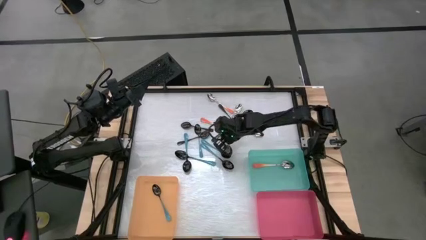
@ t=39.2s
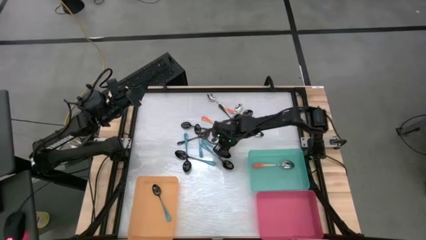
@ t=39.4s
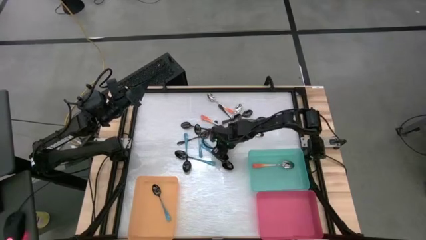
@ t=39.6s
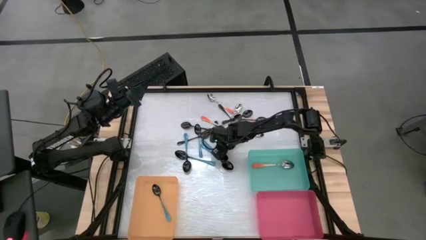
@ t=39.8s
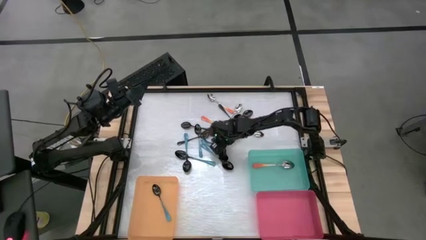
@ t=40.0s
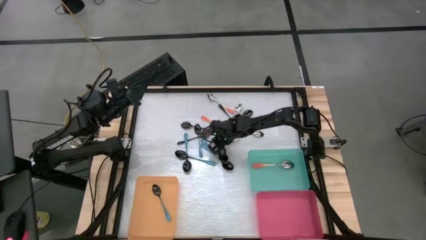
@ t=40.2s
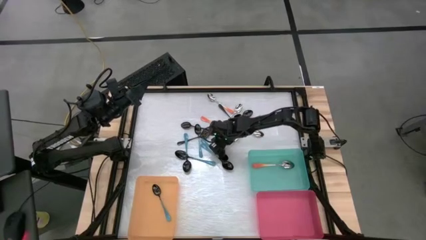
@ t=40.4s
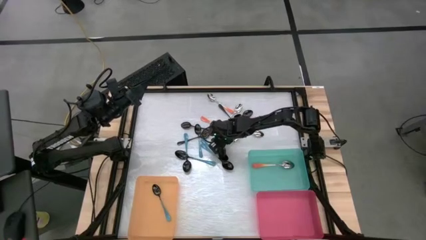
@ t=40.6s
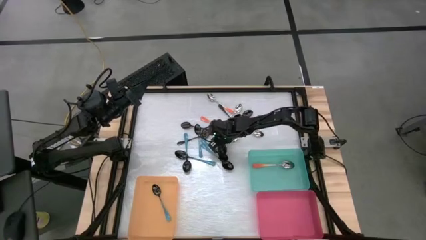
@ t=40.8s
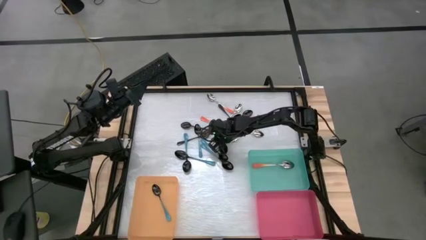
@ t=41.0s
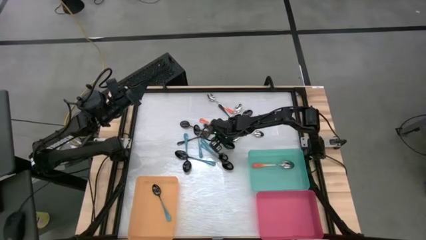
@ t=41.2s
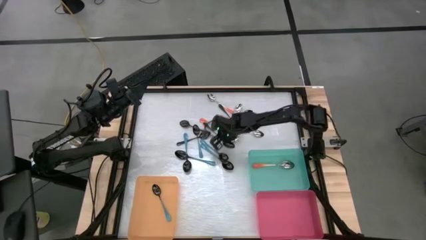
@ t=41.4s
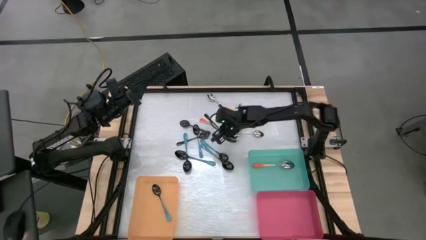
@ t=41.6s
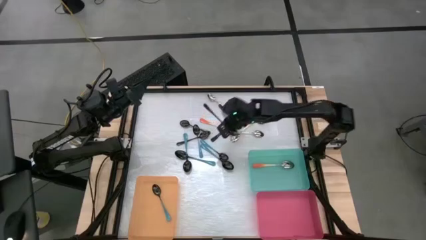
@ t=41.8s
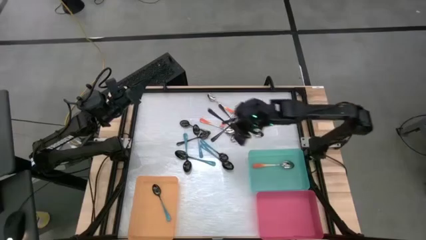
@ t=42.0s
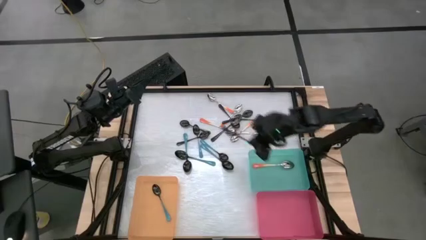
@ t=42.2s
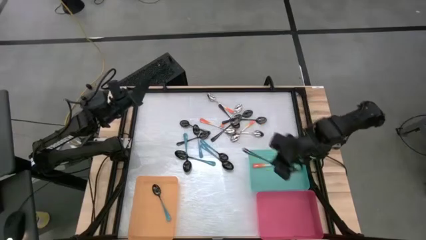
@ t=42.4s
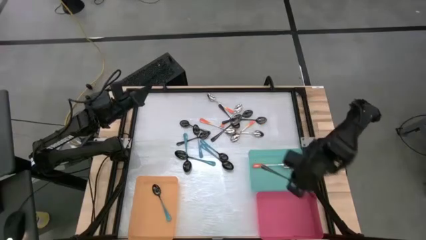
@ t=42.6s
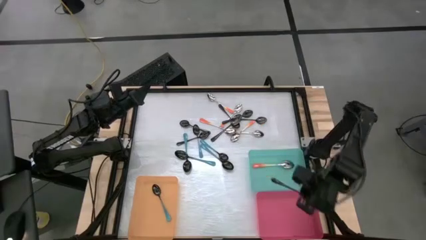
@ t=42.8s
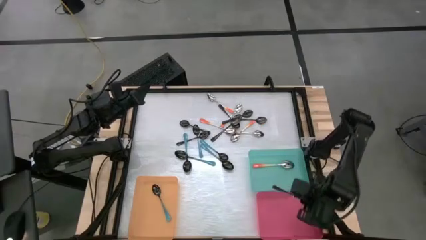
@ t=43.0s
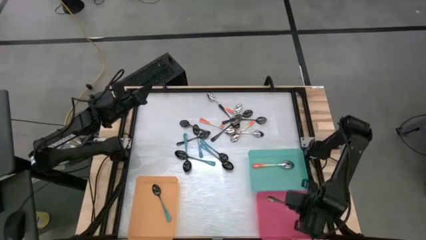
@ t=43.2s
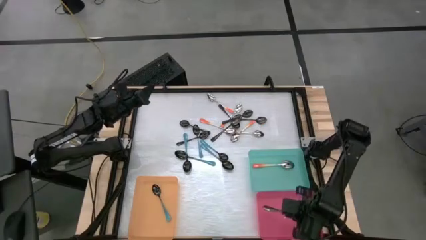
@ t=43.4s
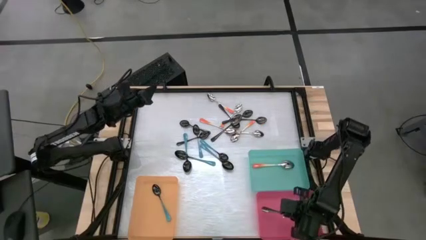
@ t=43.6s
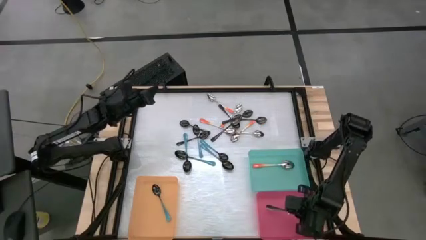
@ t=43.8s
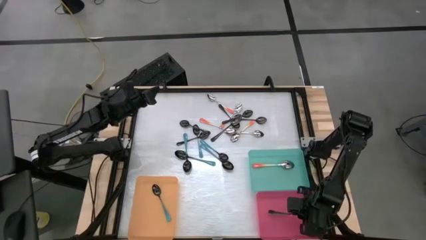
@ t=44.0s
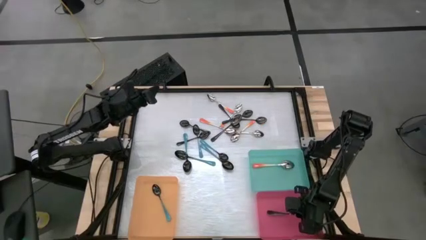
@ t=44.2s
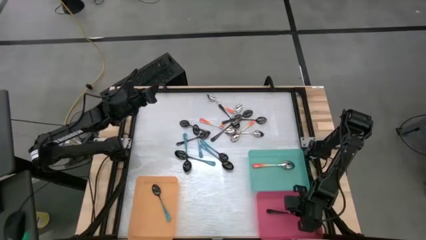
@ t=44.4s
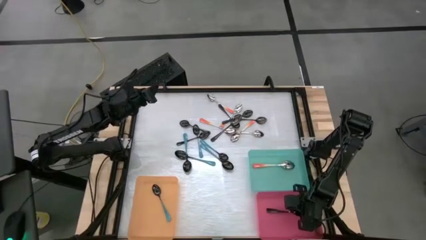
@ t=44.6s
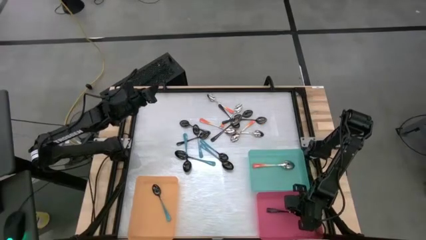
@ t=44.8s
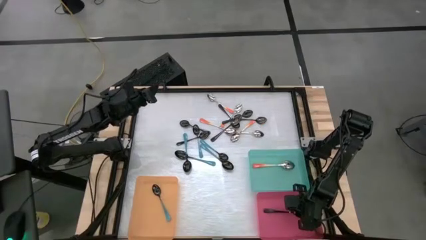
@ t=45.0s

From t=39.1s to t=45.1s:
Task: Sort silverware by color (type)
Put the black spoon into the pink bin

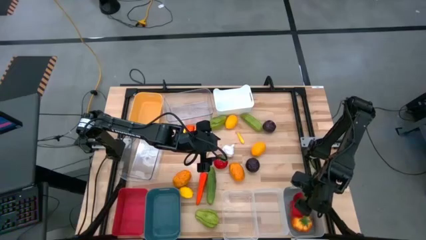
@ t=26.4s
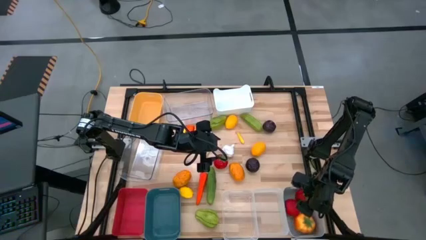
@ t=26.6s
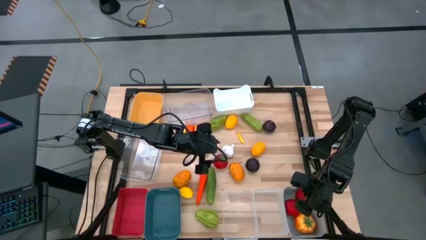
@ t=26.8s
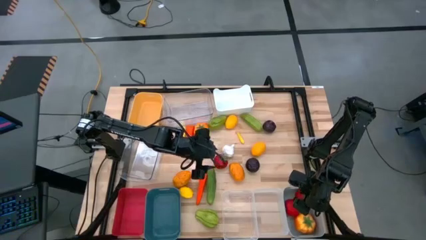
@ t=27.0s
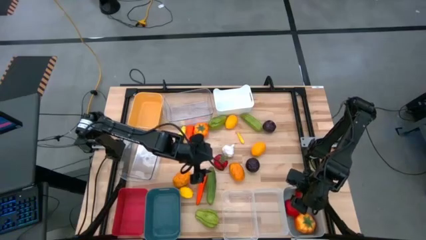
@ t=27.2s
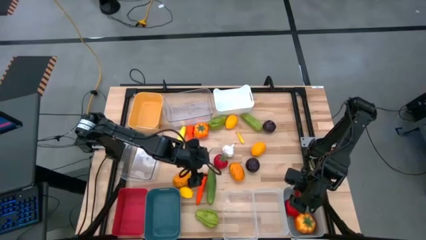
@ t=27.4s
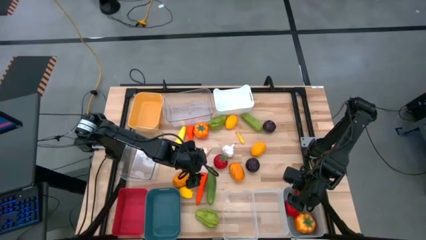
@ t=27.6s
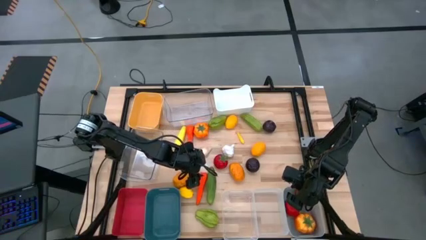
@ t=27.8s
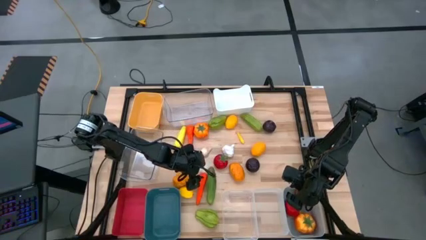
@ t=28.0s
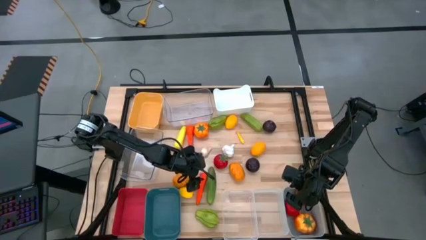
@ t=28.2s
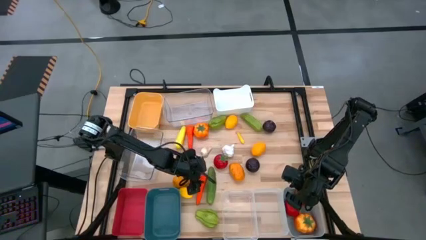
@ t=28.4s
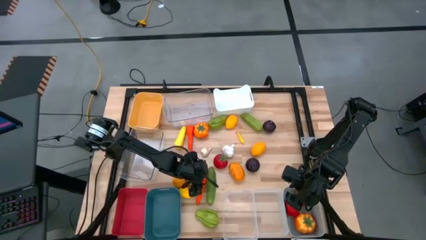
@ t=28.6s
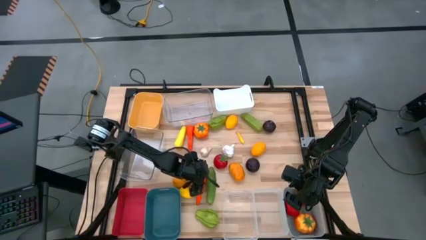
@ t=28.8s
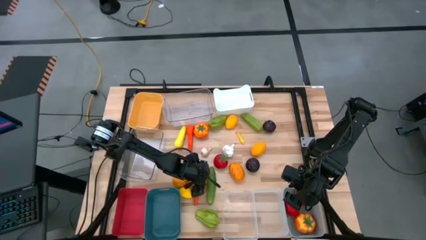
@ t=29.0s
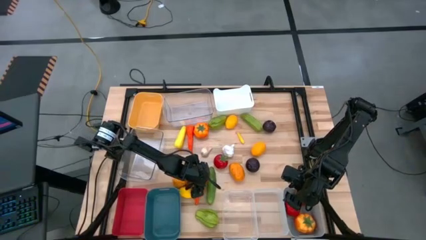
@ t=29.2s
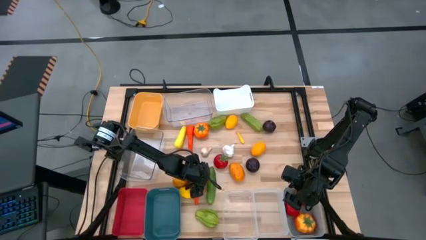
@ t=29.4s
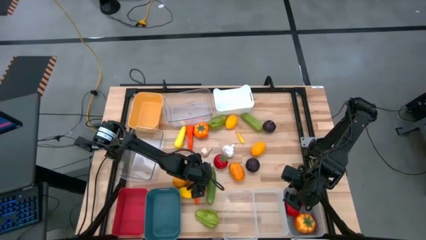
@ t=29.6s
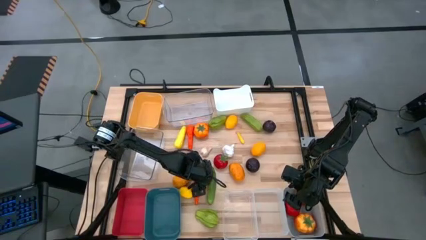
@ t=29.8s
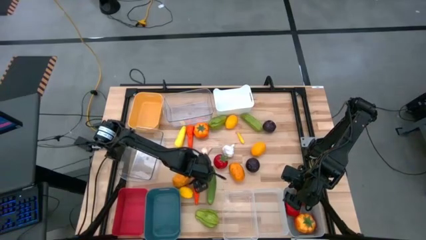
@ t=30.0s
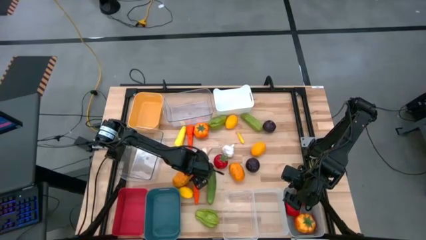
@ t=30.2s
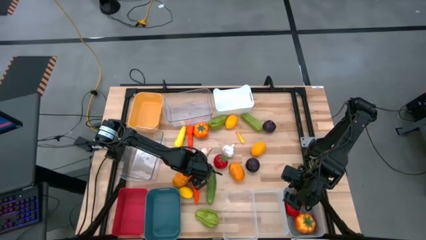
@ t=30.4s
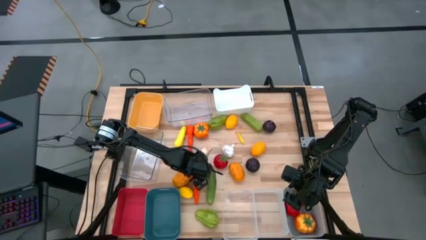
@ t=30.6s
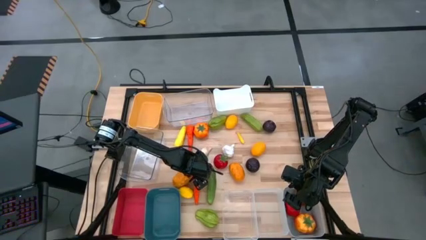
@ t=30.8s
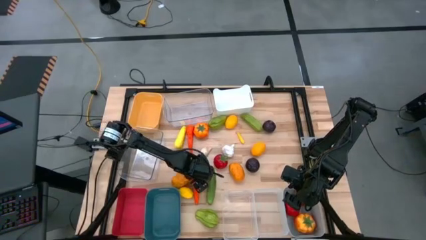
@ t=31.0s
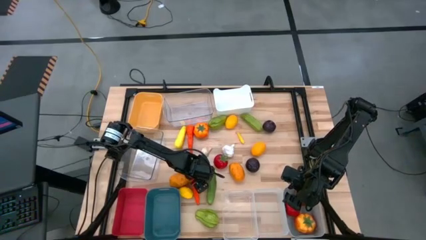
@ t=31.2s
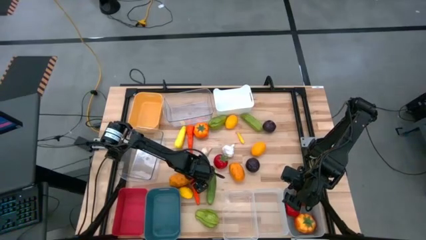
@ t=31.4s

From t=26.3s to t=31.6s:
Task: Sort produce into baskets
Put the bottom orange carrot into the yellow bin

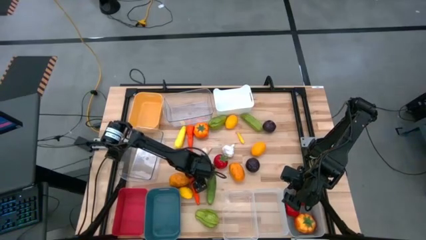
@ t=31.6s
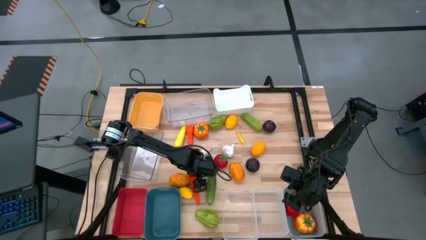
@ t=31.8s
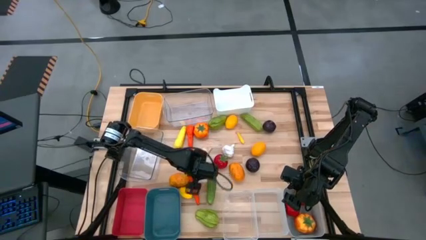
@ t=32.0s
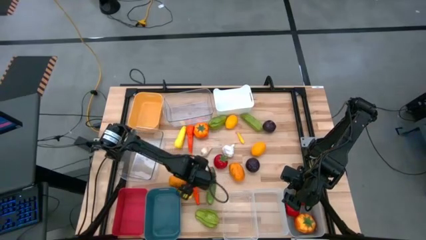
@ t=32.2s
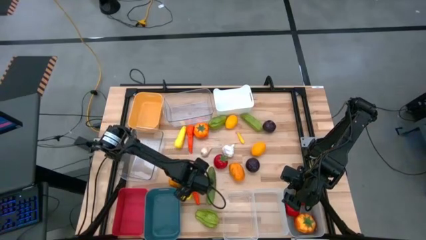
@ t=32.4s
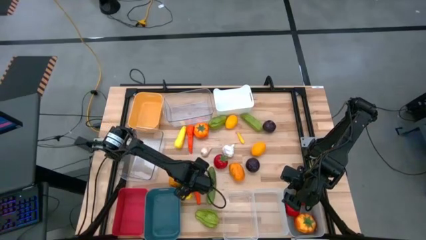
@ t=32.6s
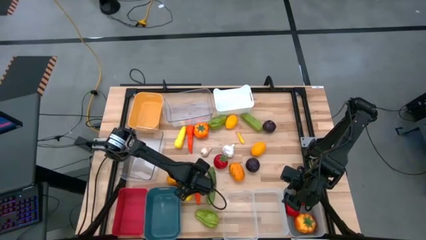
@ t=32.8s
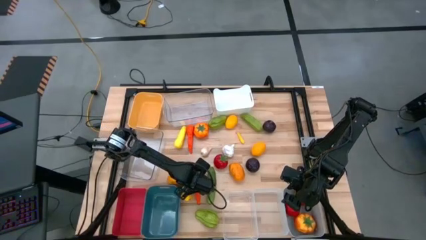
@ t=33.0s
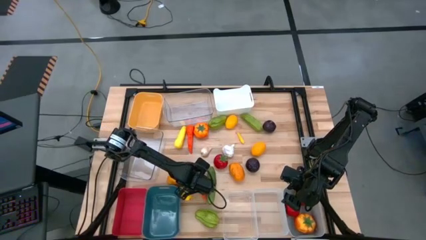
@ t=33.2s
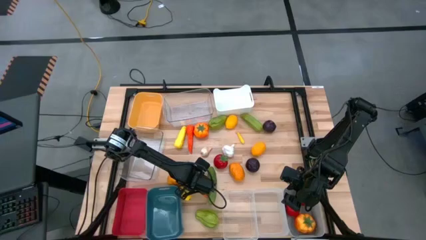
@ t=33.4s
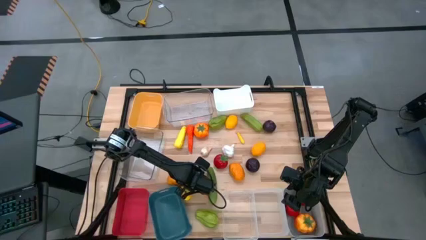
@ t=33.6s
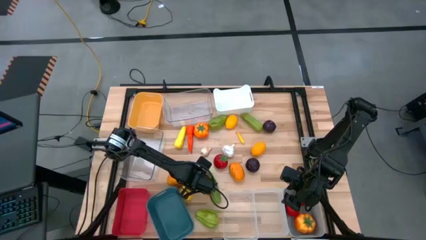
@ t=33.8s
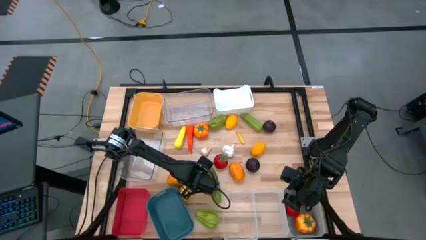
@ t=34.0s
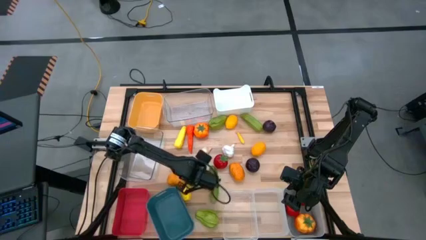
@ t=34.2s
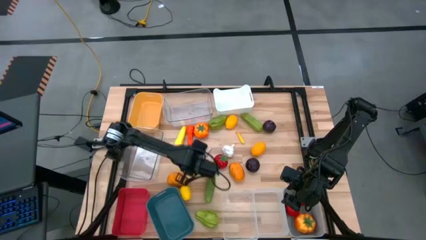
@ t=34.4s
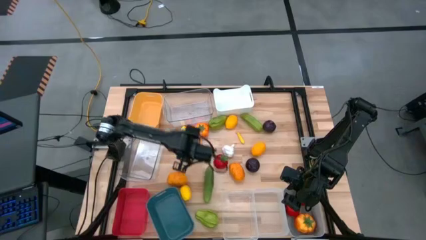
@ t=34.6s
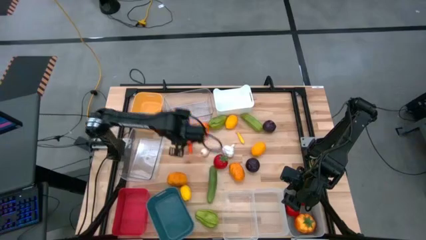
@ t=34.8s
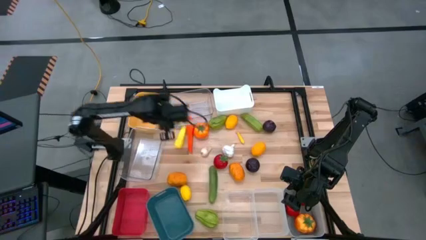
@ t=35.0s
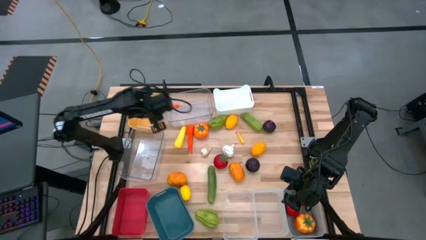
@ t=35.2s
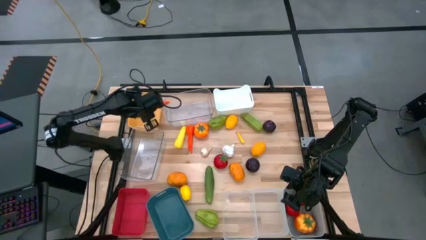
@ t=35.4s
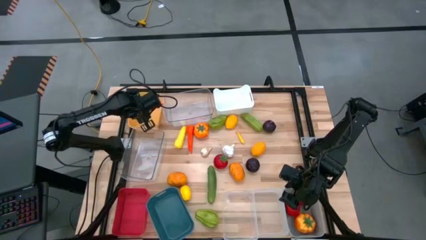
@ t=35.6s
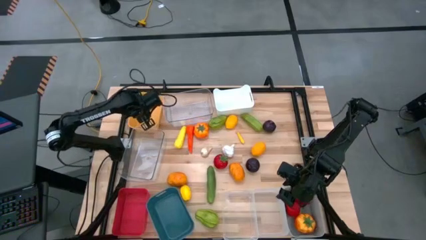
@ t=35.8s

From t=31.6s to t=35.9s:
Put the bottom orange carrot into the yellow bin
